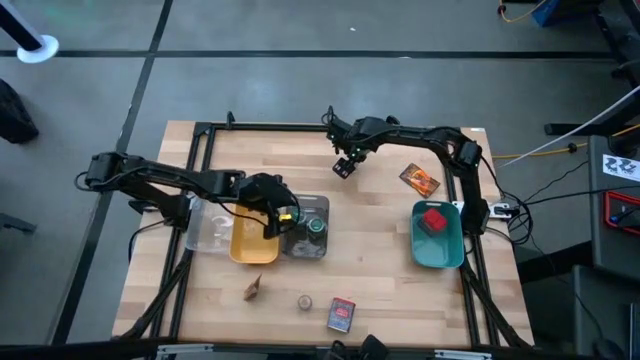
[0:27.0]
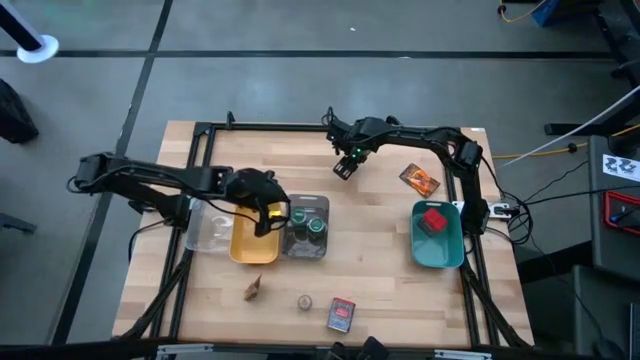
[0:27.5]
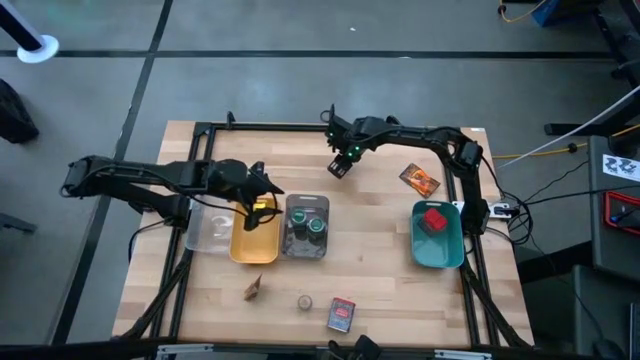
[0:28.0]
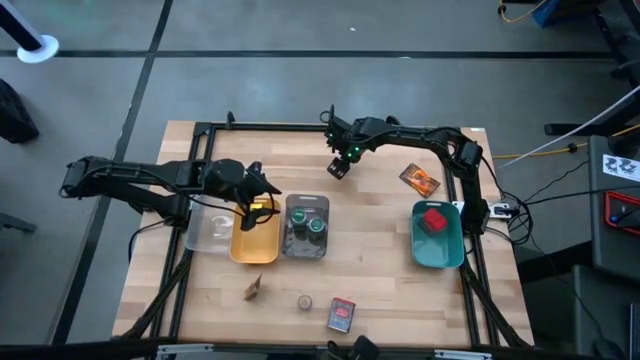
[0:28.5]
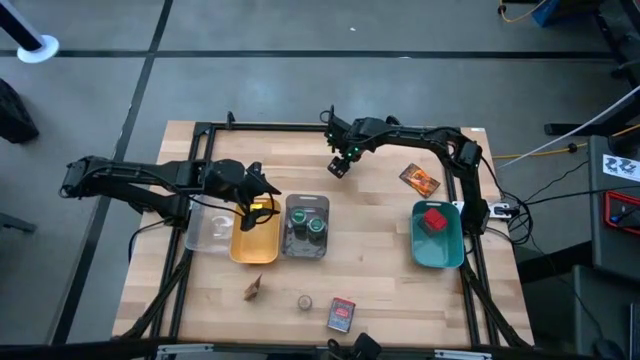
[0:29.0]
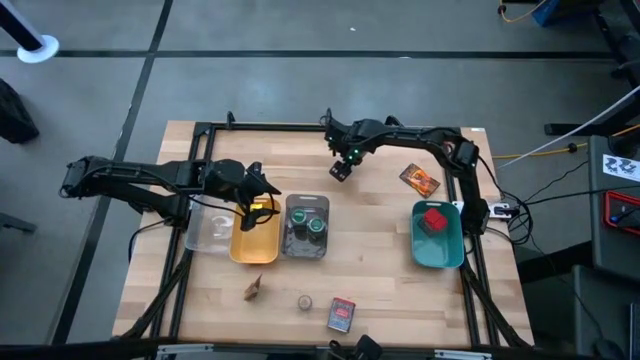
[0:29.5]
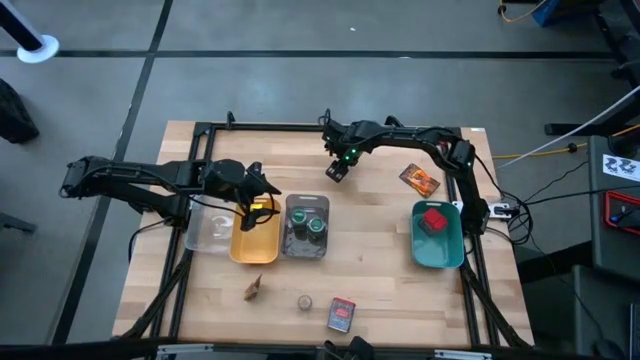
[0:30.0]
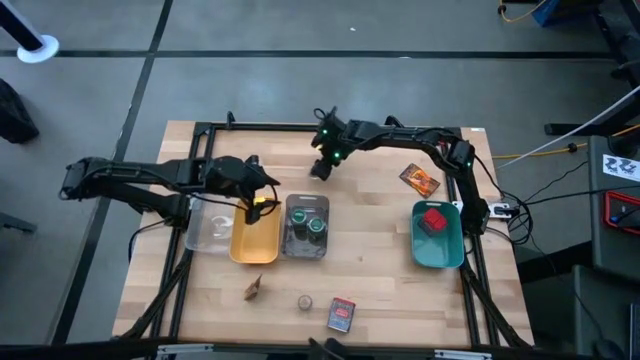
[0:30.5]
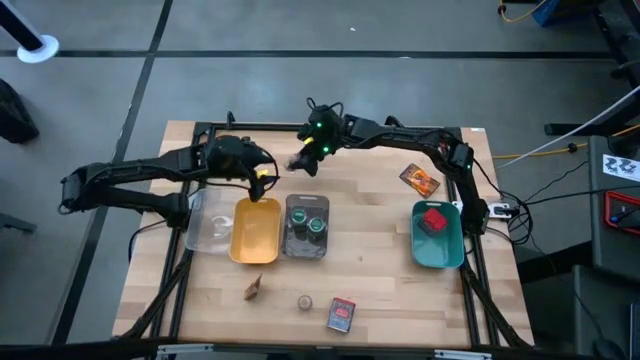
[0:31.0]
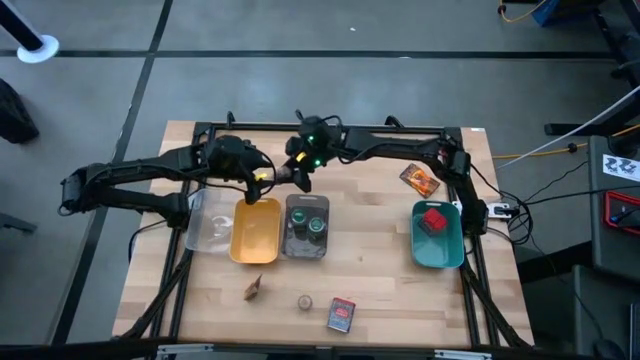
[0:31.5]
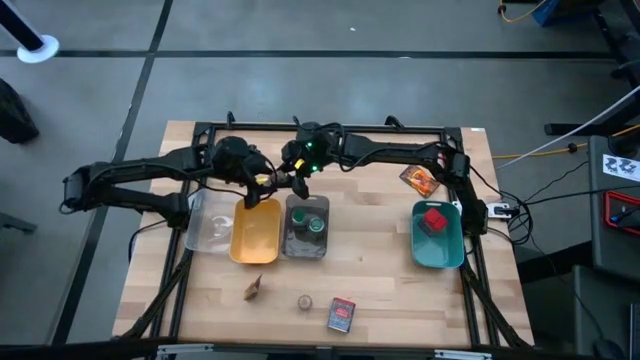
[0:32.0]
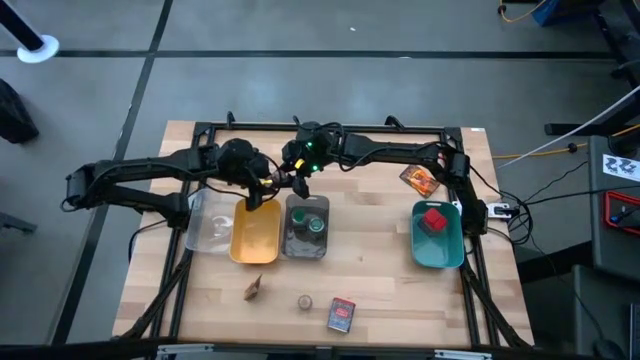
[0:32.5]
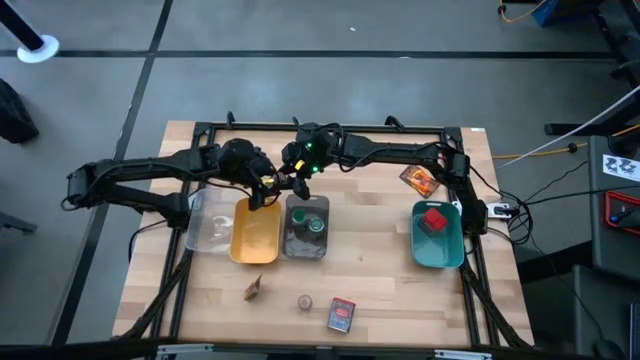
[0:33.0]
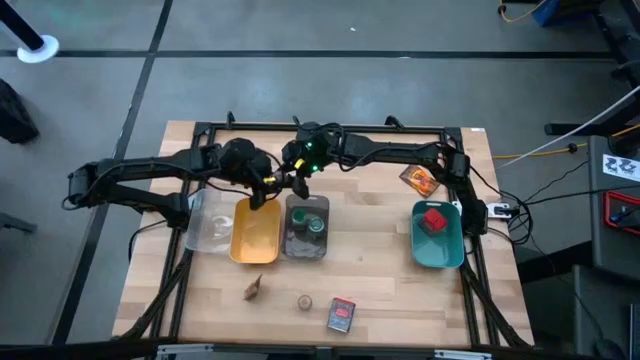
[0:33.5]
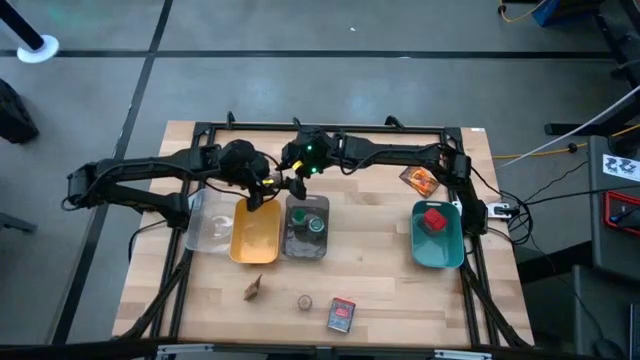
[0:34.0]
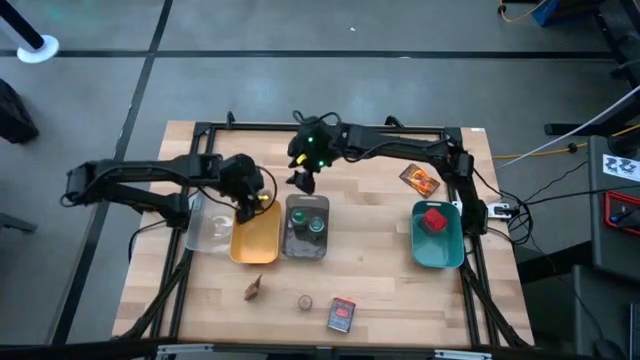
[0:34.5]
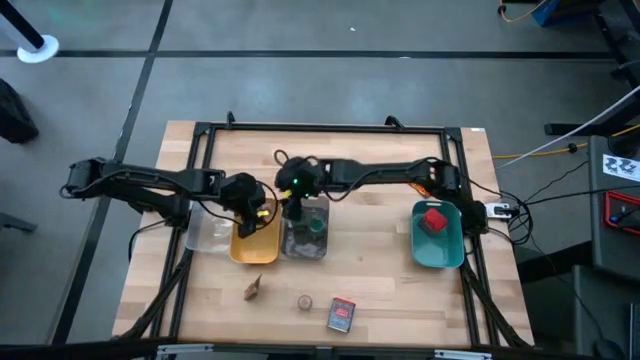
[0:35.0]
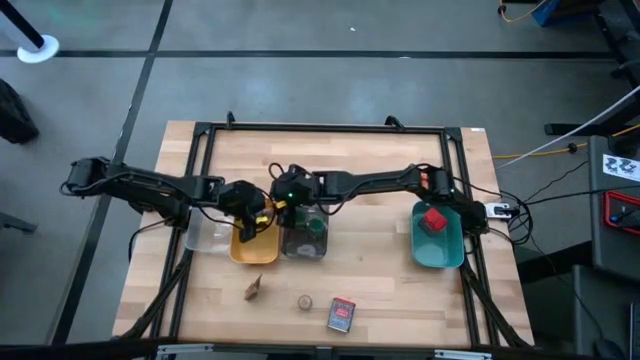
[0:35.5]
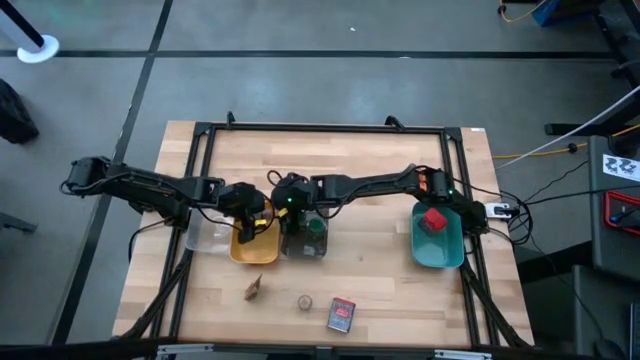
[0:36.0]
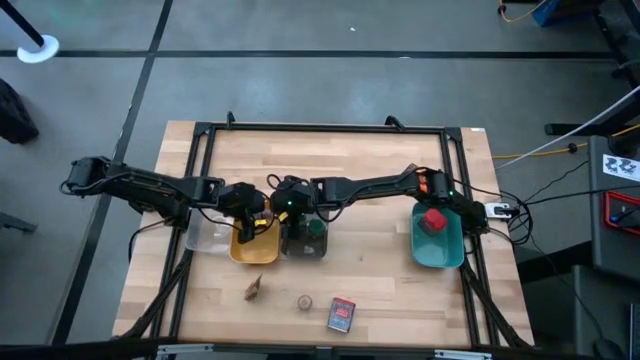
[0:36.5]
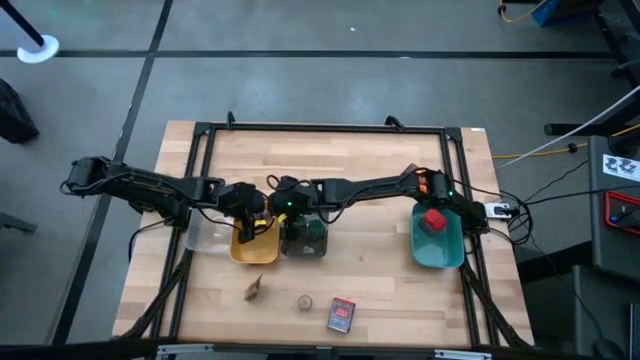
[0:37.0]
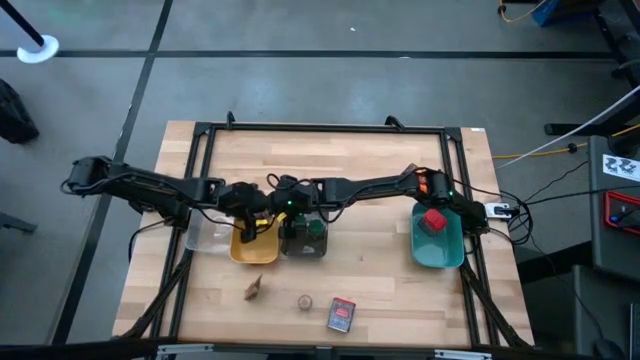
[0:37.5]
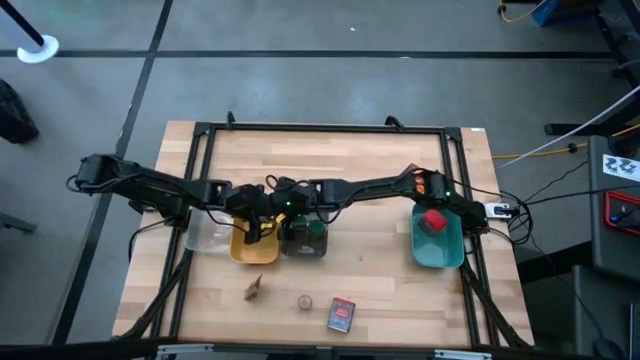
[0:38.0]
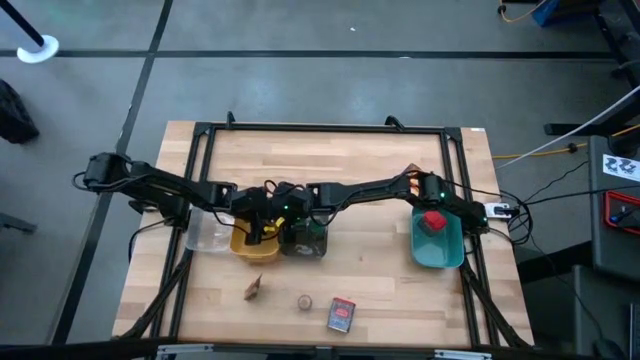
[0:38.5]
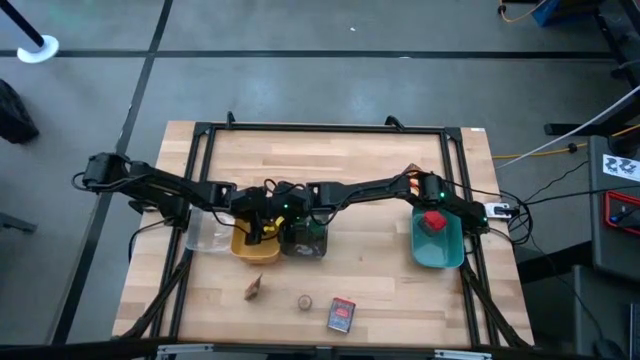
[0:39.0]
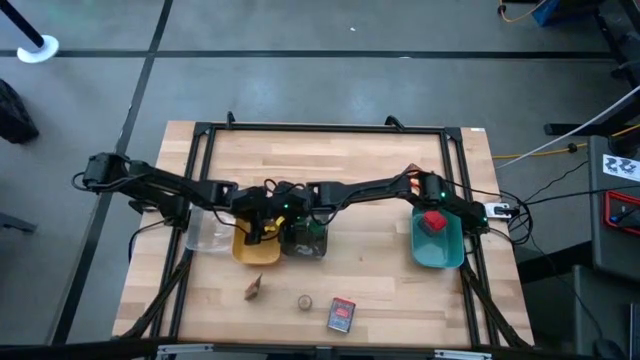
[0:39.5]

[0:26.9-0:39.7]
Task: Sort spices by type
Put the top brown spice bottle into the yellow bin

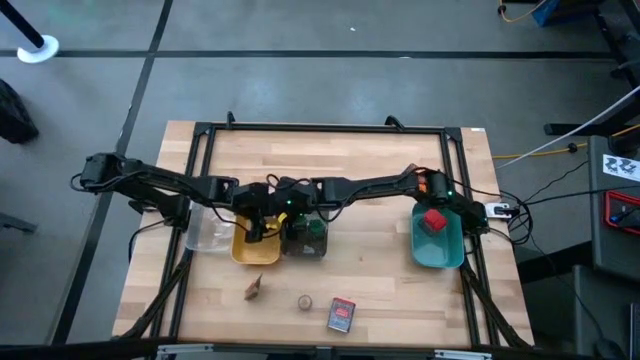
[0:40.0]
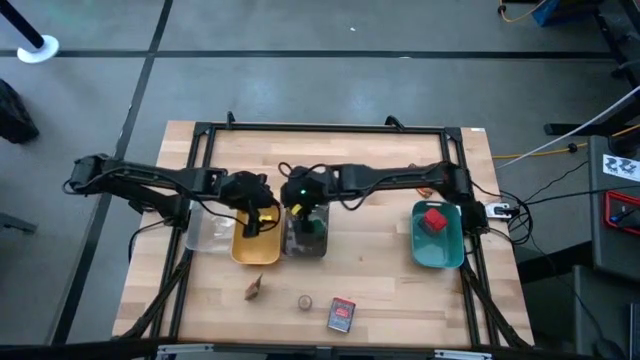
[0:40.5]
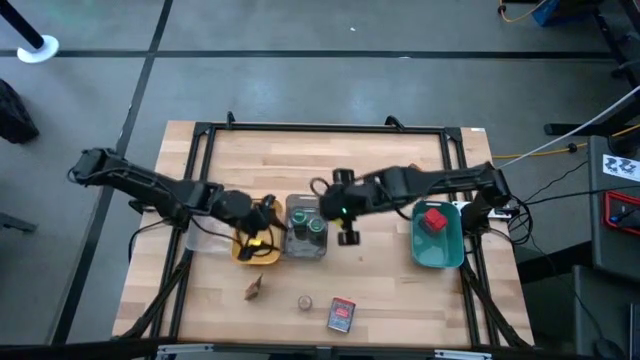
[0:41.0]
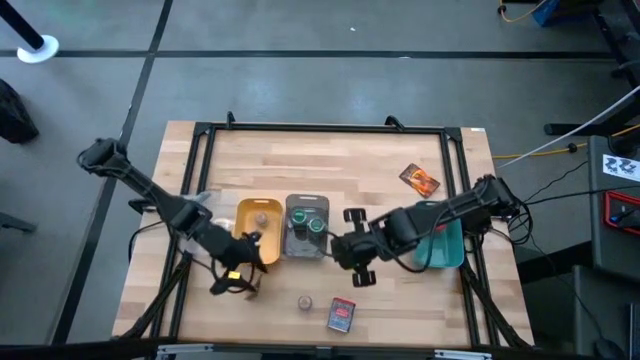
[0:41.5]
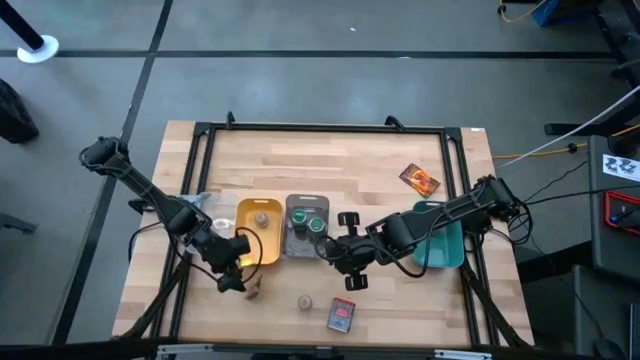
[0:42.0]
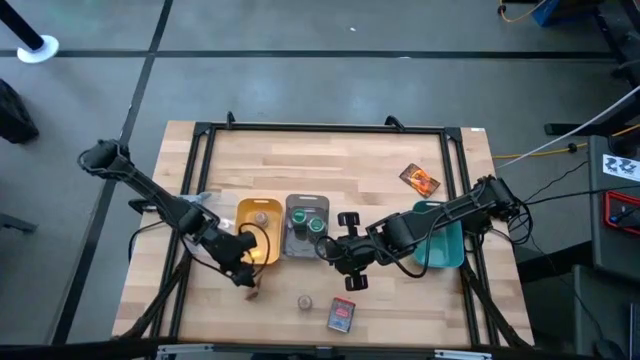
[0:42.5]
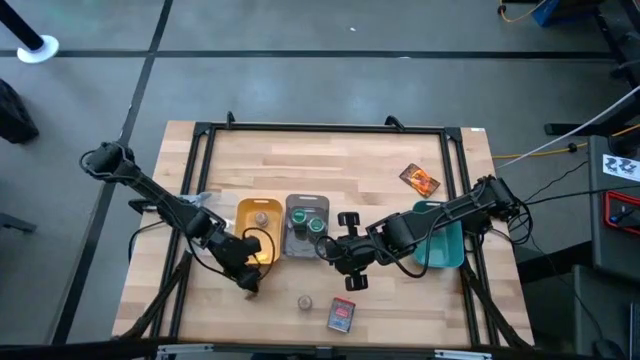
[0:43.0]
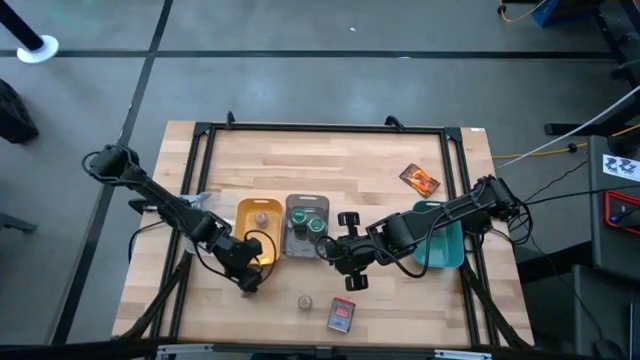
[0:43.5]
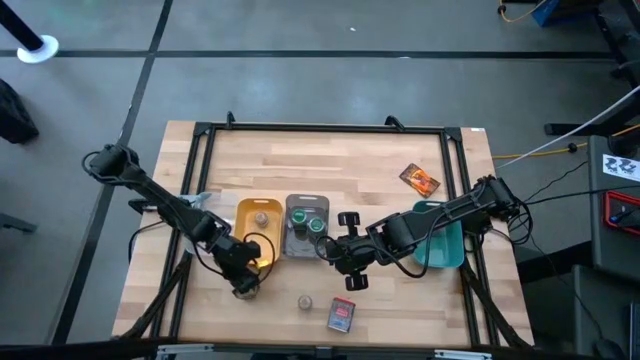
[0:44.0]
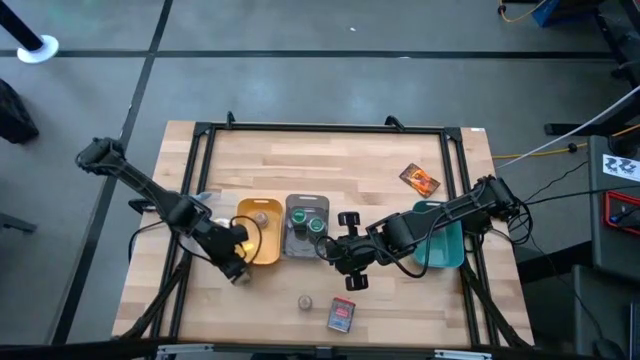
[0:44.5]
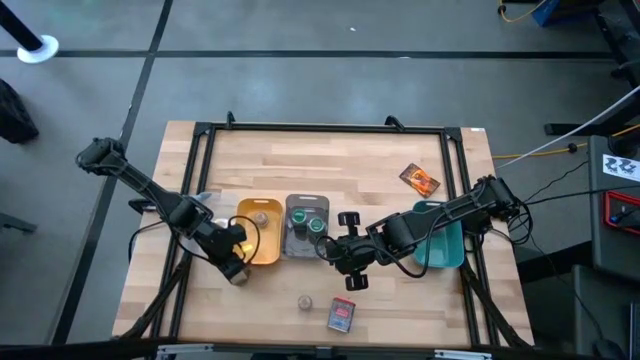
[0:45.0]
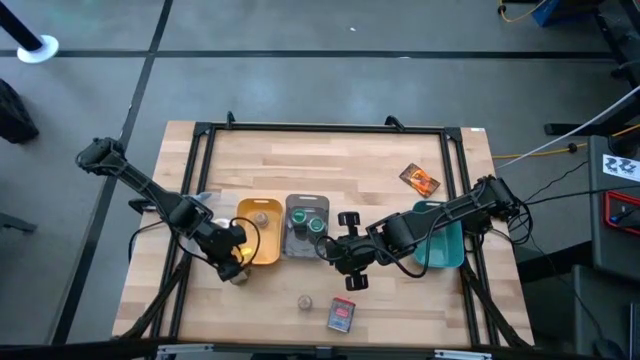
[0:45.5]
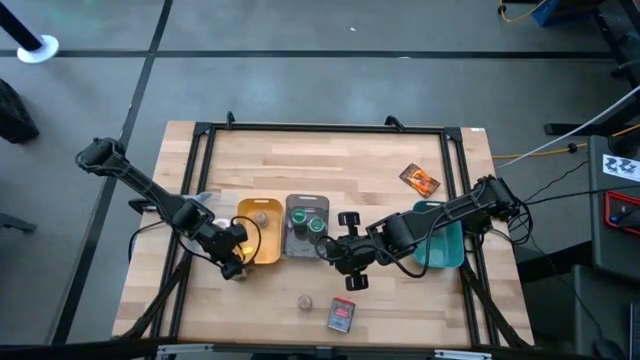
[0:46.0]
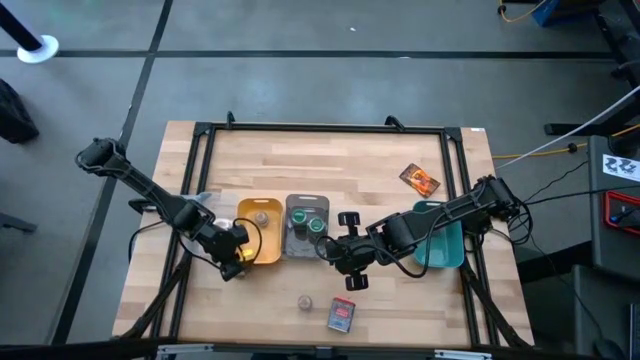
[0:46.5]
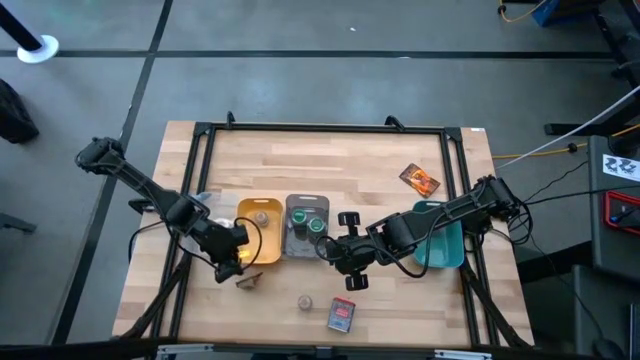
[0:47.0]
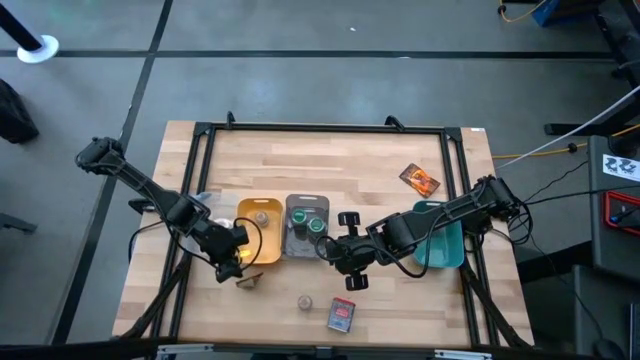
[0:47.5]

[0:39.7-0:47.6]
Put the bottom orange spice bag into the transparent bin
